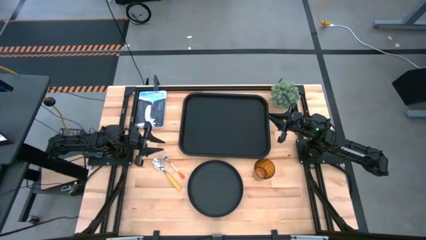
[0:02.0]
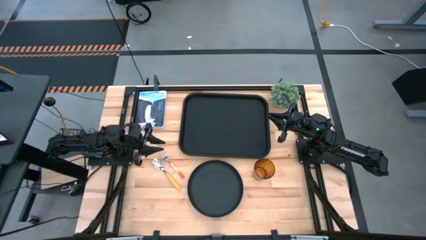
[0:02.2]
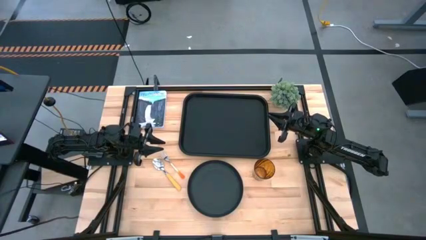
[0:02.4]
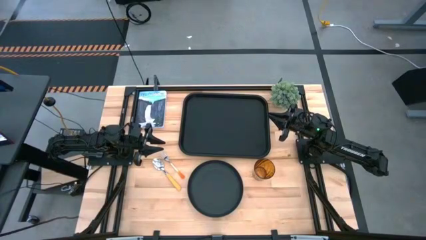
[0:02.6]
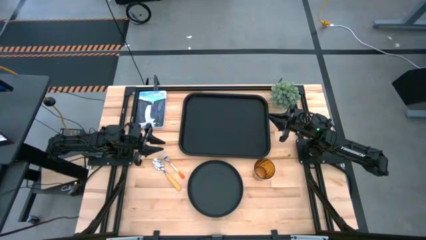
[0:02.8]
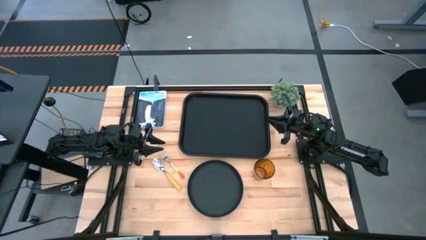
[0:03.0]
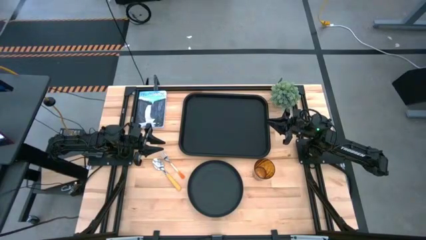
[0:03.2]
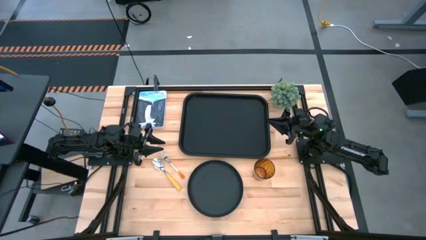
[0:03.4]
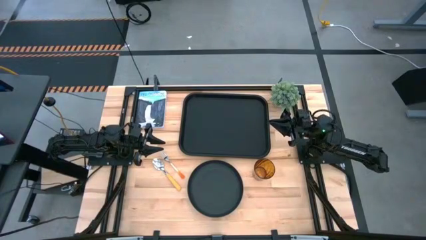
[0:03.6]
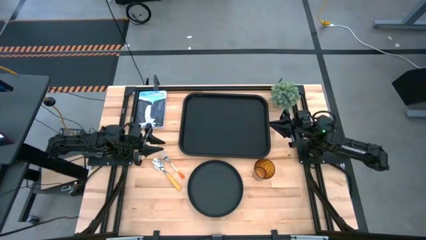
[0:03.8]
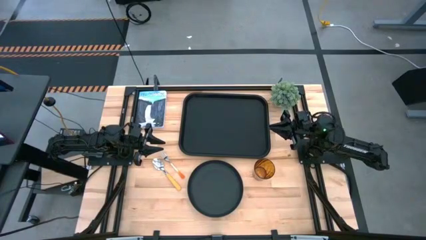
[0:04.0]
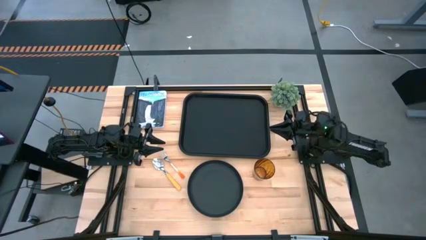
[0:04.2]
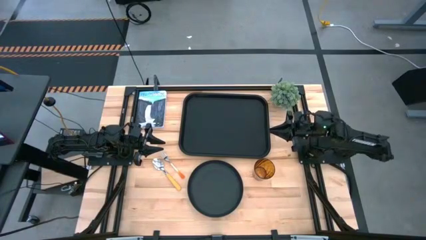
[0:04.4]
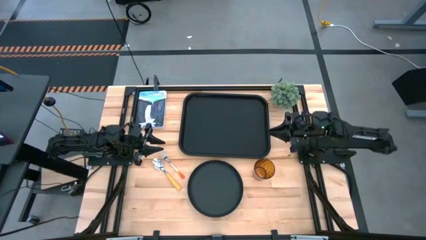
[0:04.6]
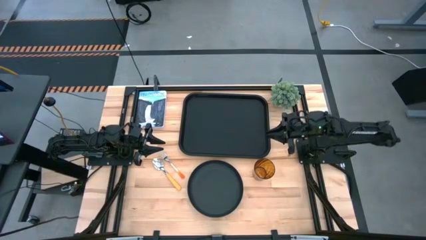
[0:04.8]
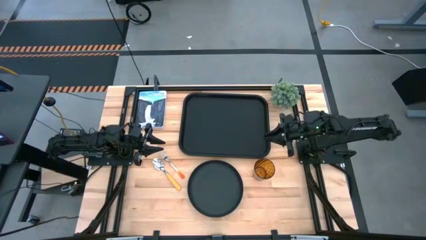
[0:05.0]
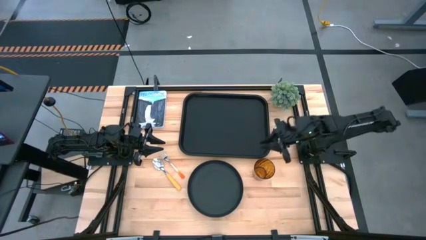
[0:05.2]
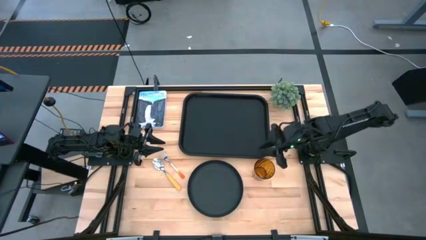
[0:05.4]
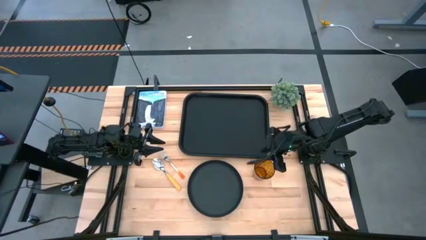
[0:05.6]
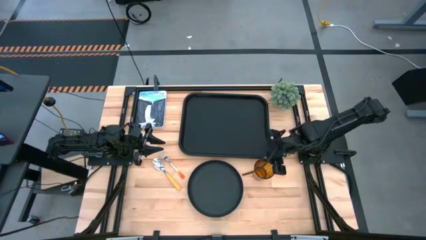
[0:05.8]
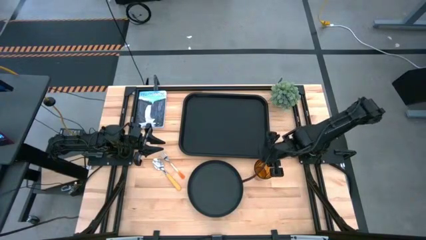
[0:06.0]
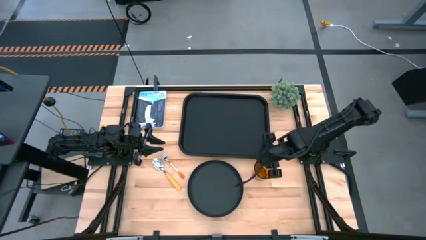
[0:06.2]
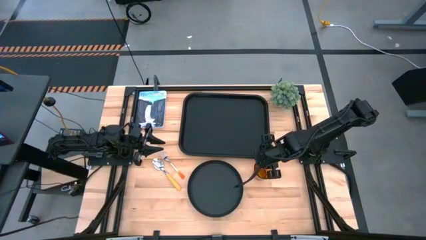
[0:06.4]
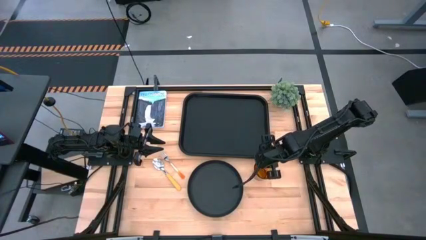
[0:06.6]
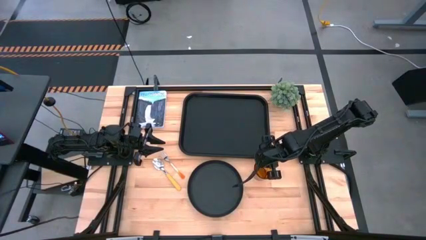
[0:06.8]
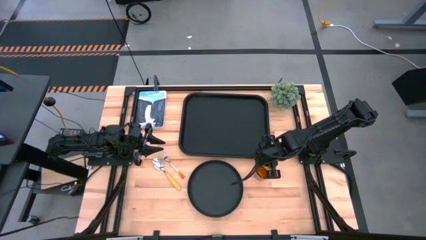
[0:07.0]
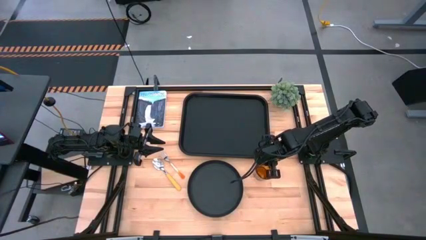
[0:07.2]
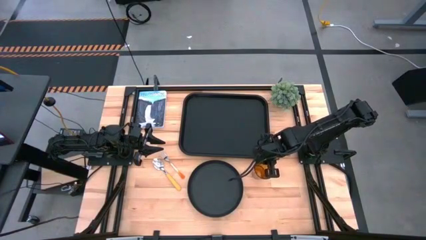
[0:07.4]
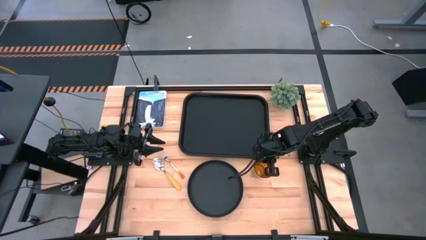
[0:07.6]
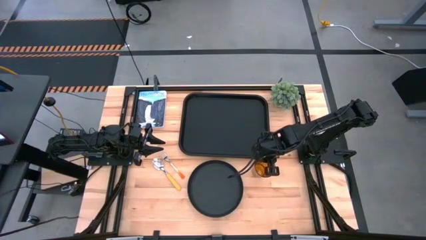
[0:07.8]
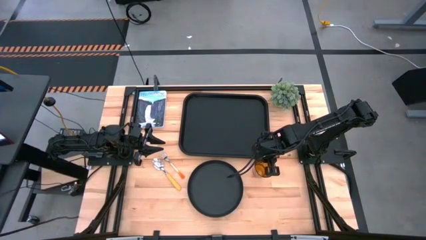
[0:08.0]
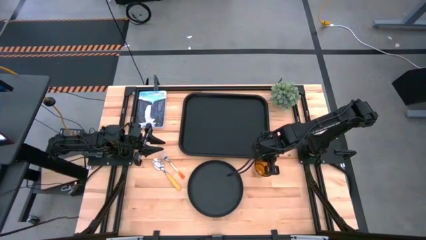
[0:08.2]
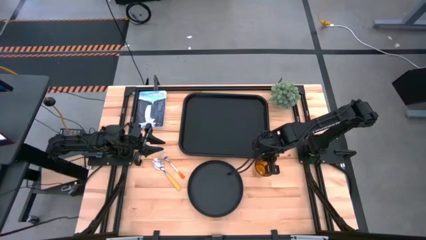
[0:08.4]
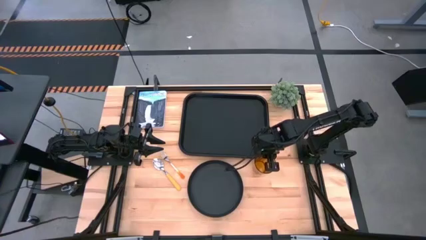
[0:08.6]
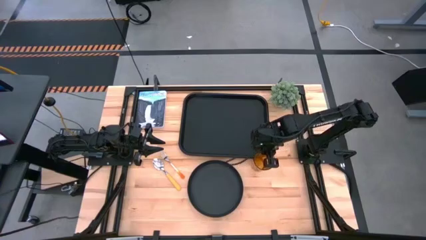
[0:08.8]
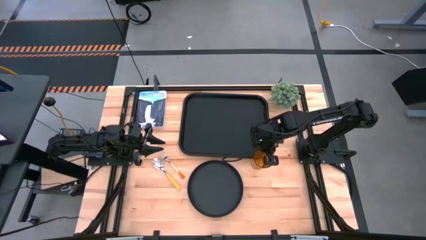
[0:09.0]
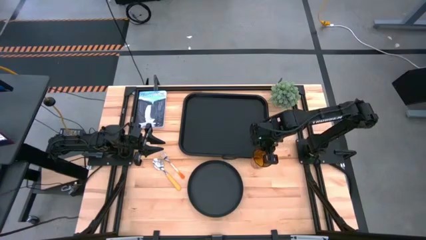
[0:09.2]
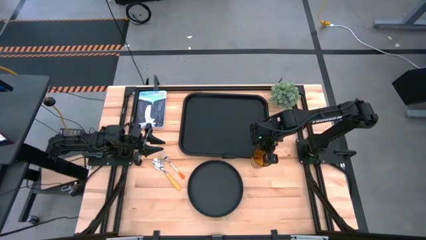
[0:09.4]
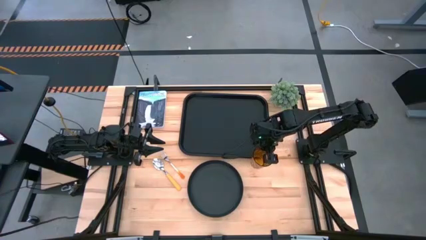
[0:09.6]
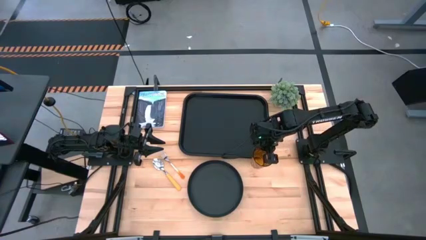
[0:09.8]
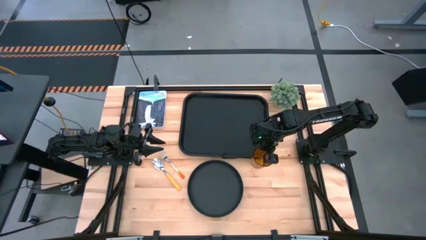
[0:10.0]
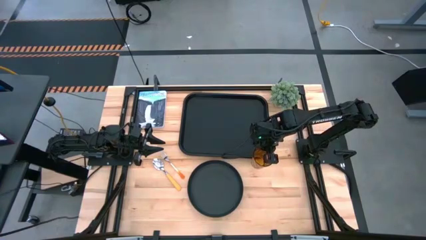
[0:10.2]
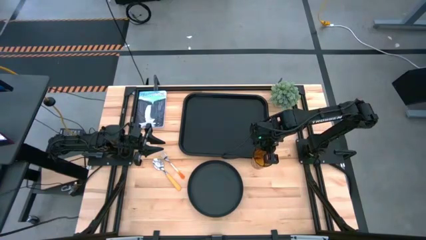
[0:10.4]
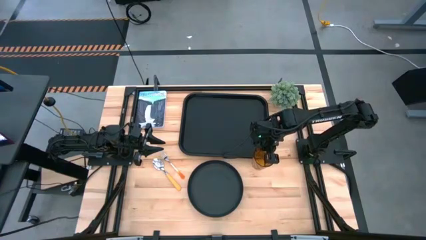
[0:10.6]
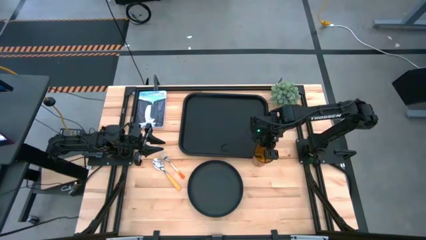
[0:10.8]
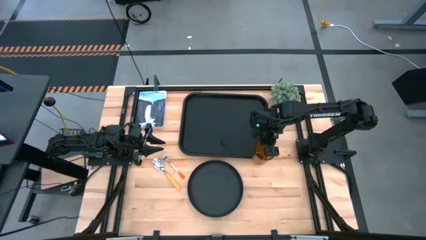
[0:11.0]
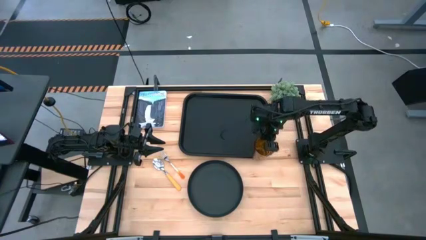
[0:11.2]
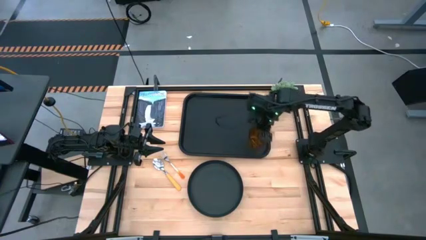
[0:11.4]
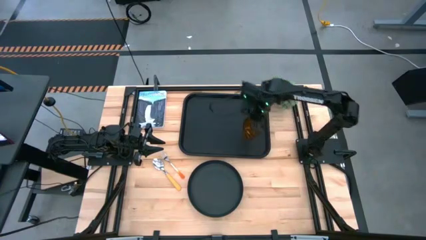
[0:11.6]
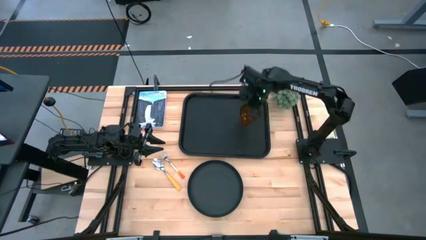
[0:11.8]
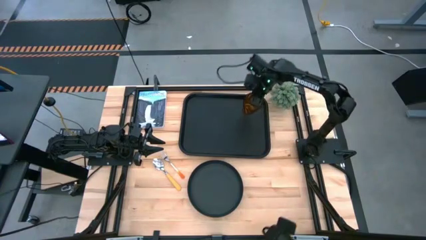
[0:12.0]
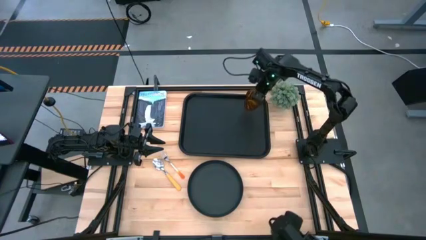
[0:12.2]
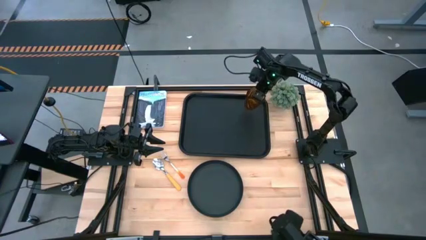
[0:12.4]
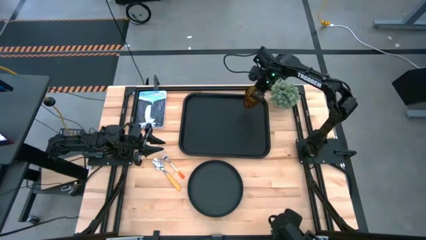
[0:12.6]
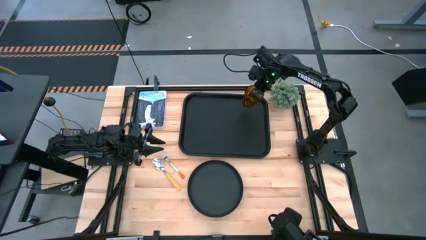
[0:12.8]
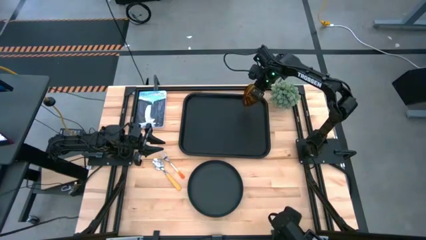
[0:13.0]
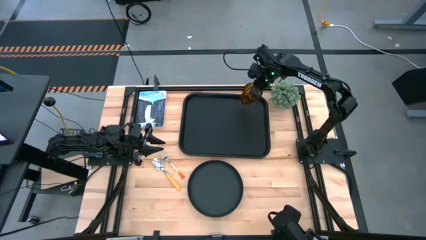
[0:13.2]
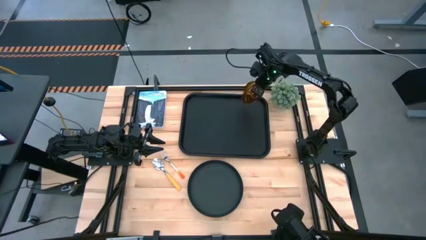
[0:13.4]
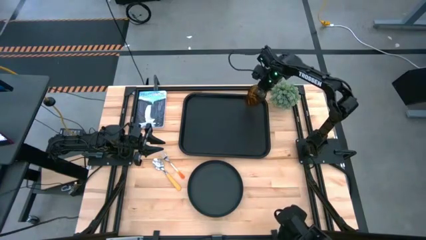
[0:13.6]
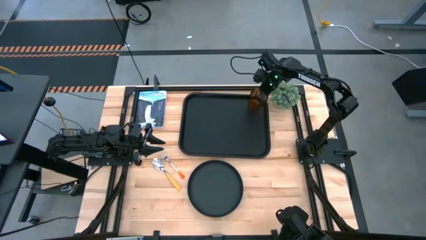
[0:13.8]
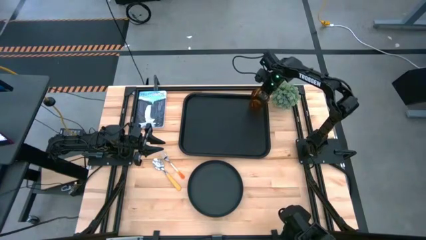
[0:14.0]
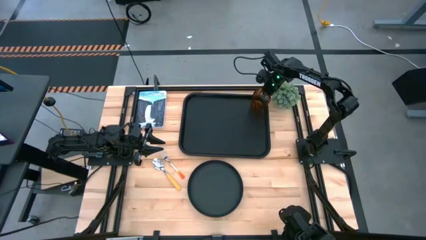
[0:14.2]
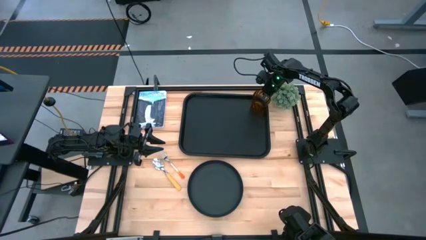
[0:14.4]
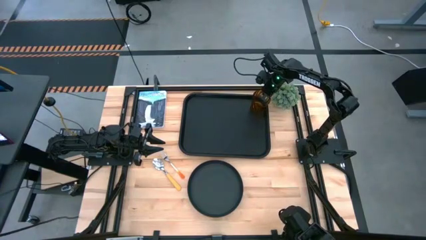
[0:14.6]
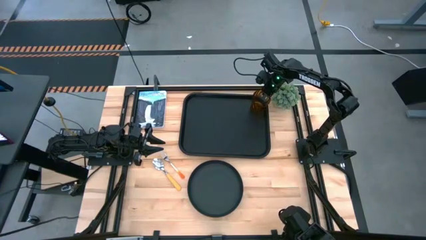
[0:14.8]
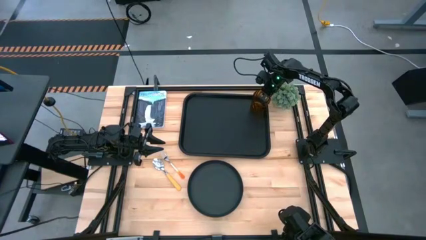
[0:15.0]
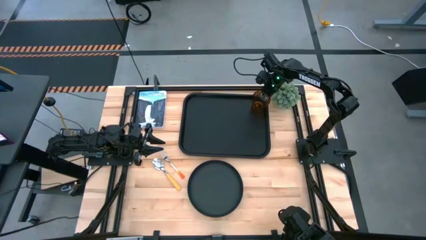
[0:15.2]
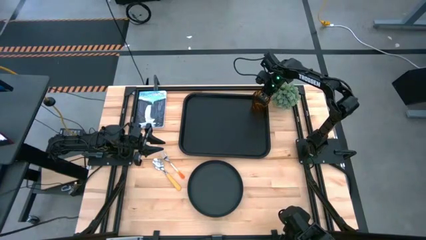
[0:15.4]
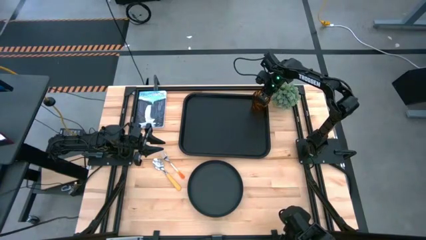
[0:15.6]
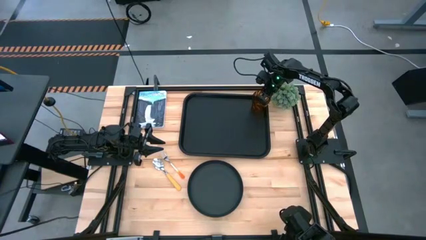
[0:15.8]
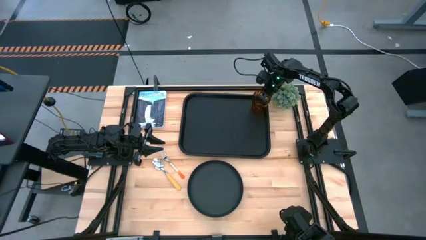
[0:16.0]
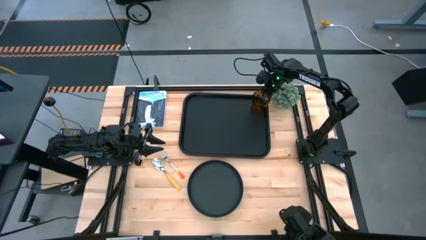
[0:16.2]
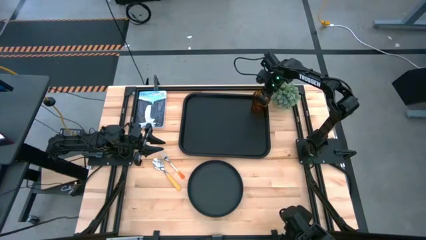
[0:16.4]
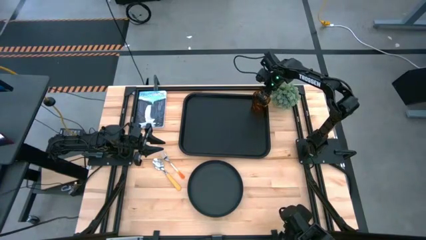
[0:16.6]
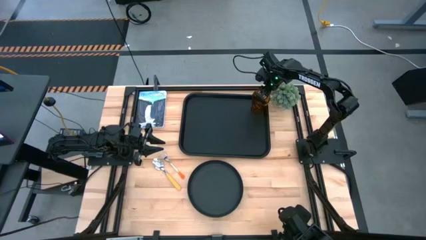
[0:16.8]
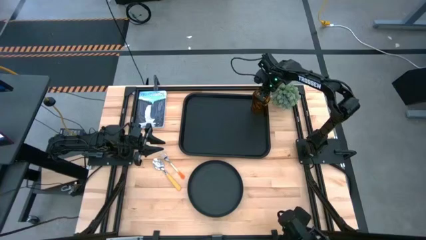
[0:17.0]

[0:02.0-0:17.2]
Task: Pick and place plate/cup/fork/spoon on tray
Put the brown glass on the black serving tray
